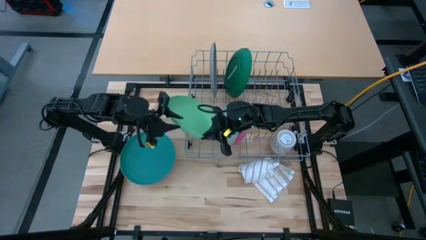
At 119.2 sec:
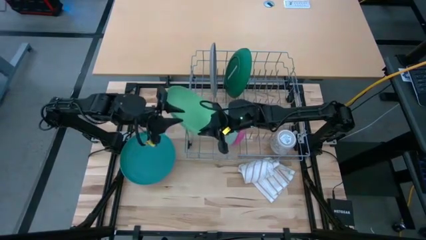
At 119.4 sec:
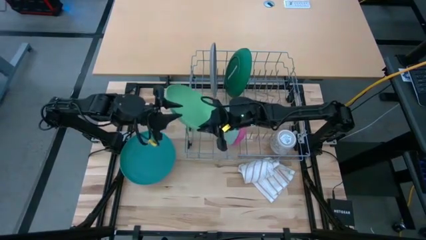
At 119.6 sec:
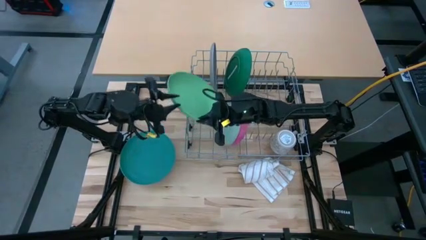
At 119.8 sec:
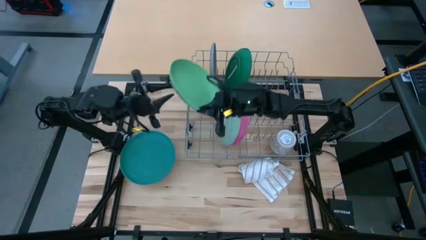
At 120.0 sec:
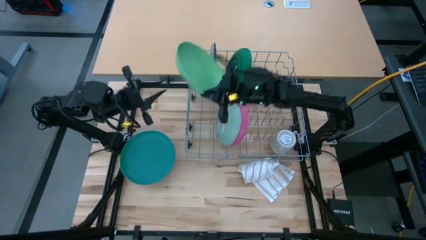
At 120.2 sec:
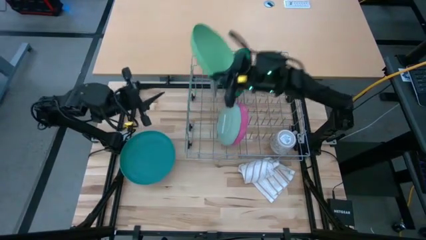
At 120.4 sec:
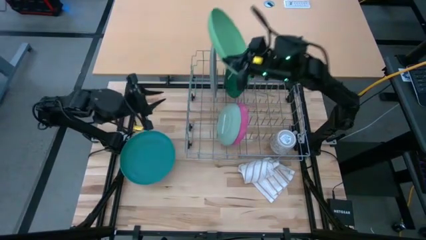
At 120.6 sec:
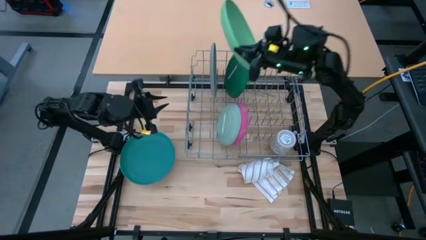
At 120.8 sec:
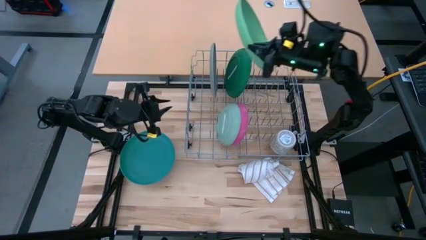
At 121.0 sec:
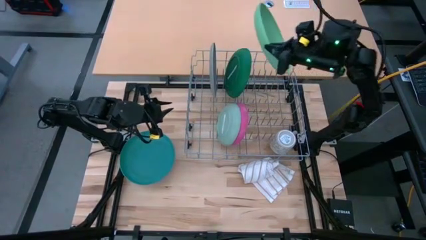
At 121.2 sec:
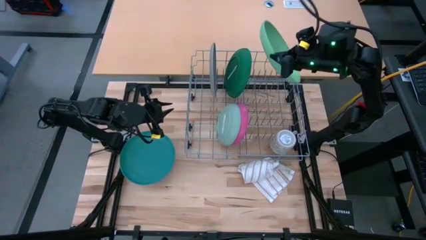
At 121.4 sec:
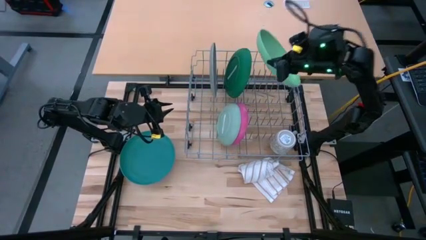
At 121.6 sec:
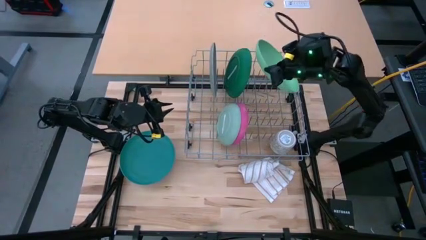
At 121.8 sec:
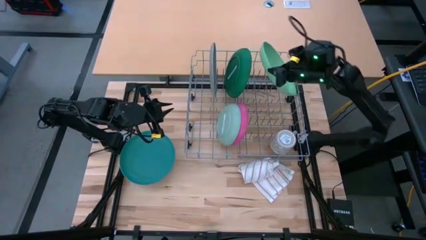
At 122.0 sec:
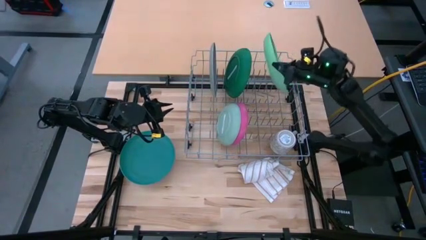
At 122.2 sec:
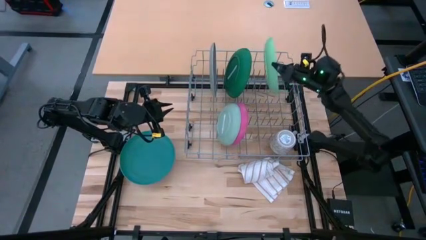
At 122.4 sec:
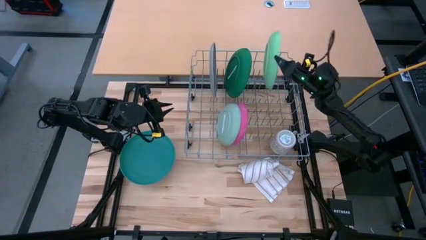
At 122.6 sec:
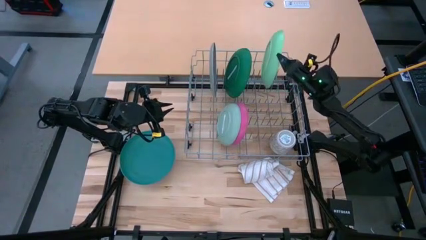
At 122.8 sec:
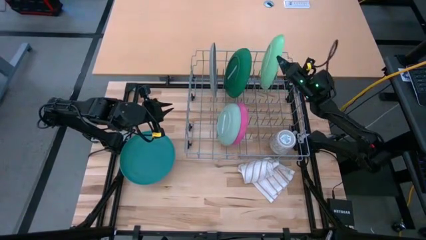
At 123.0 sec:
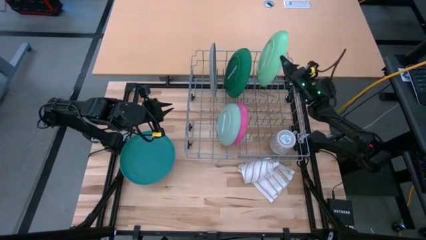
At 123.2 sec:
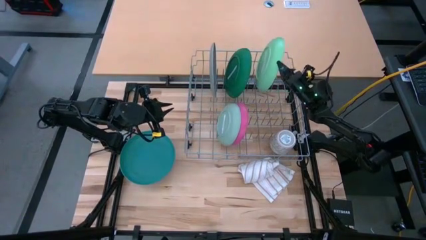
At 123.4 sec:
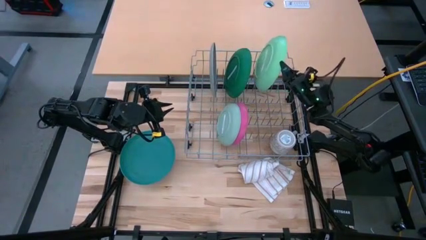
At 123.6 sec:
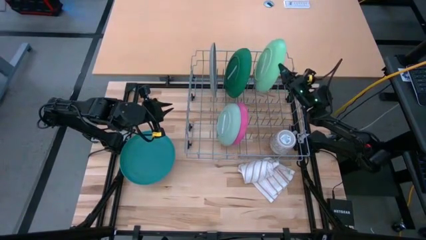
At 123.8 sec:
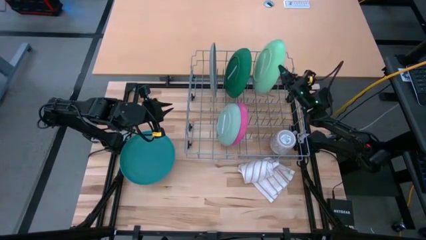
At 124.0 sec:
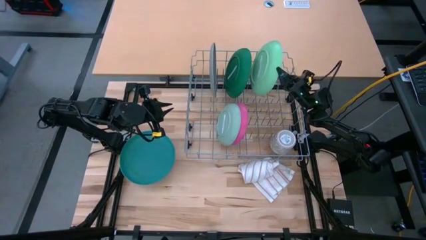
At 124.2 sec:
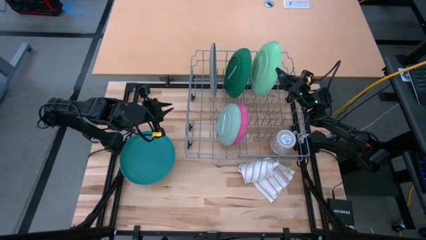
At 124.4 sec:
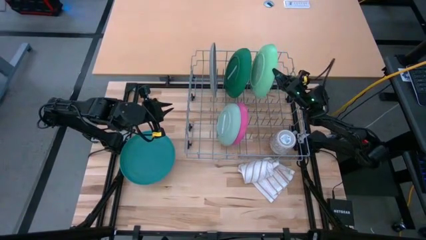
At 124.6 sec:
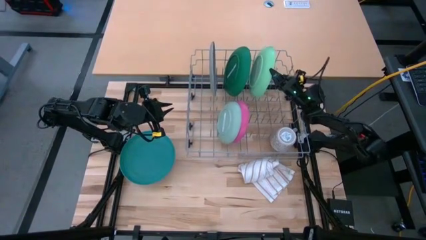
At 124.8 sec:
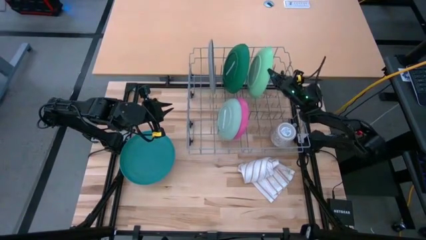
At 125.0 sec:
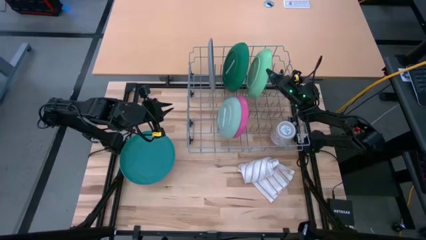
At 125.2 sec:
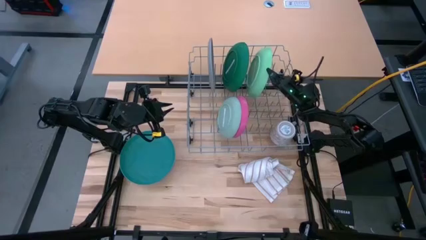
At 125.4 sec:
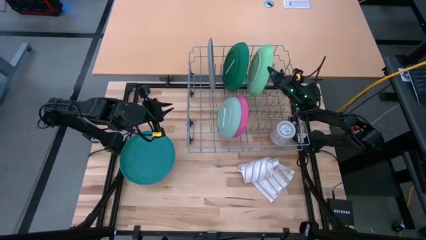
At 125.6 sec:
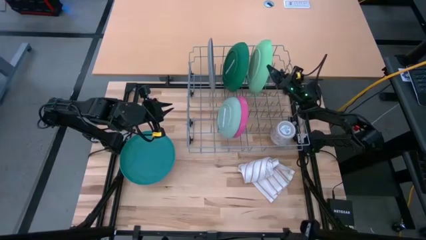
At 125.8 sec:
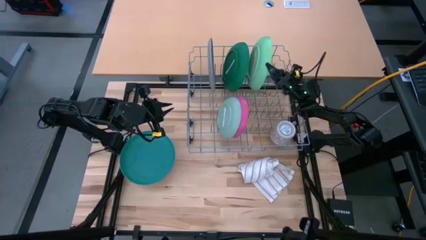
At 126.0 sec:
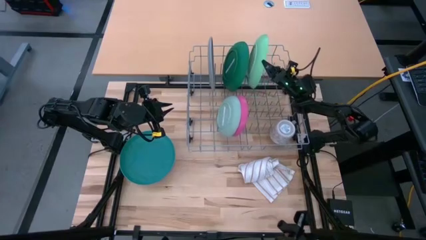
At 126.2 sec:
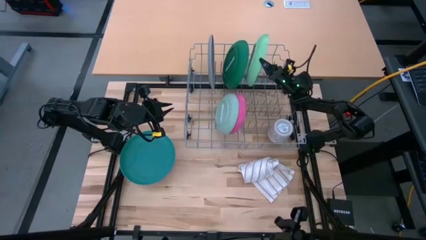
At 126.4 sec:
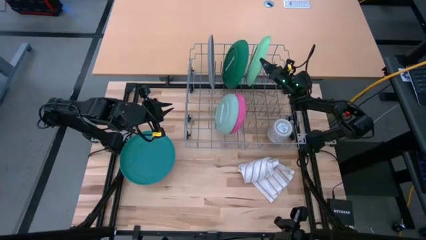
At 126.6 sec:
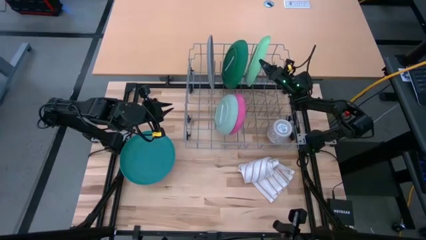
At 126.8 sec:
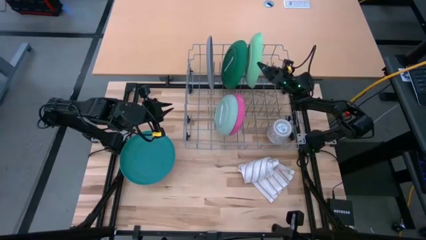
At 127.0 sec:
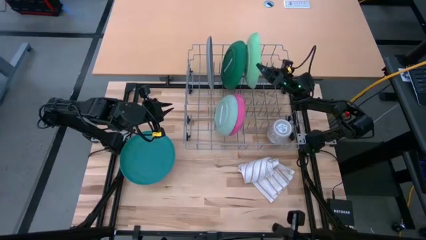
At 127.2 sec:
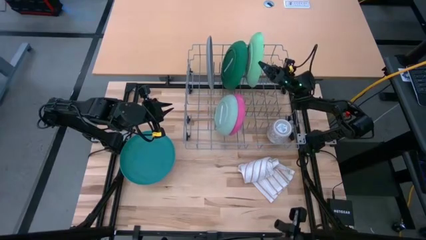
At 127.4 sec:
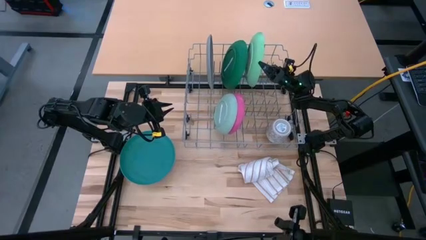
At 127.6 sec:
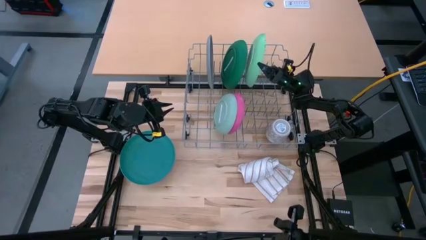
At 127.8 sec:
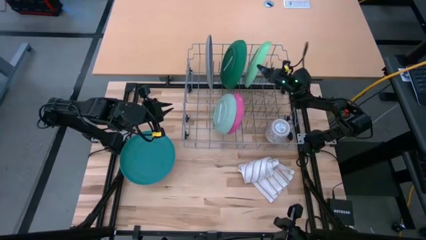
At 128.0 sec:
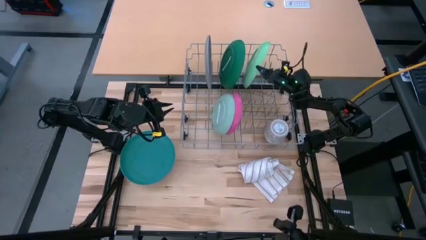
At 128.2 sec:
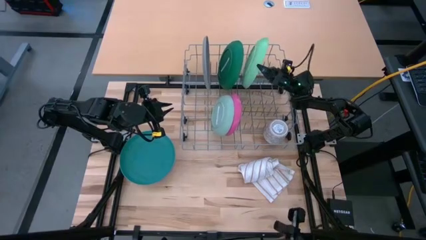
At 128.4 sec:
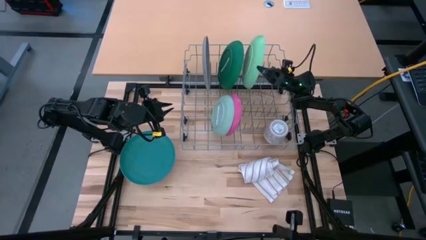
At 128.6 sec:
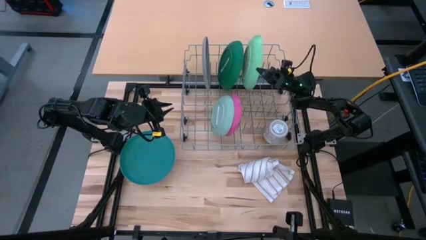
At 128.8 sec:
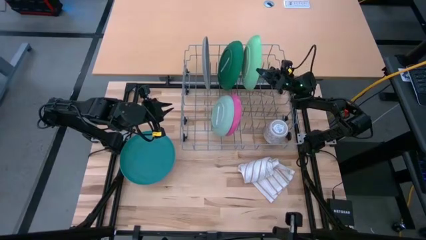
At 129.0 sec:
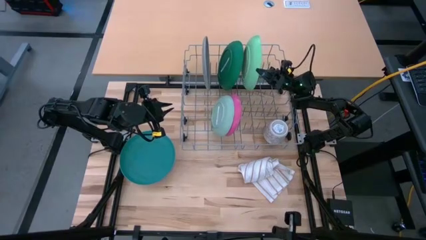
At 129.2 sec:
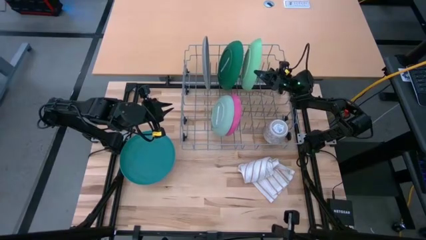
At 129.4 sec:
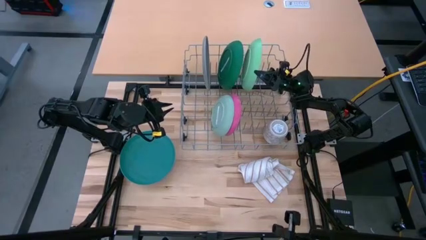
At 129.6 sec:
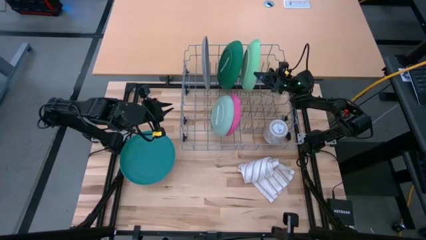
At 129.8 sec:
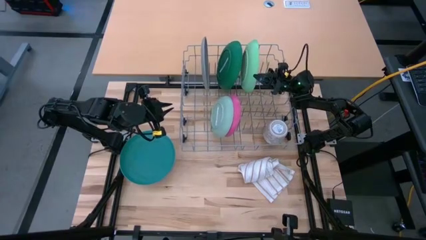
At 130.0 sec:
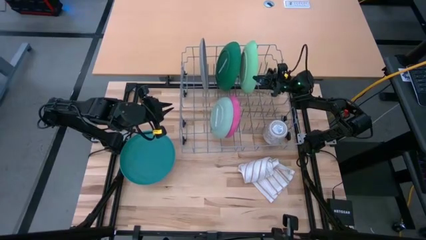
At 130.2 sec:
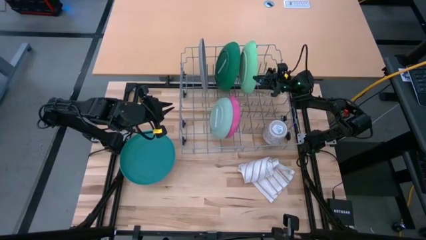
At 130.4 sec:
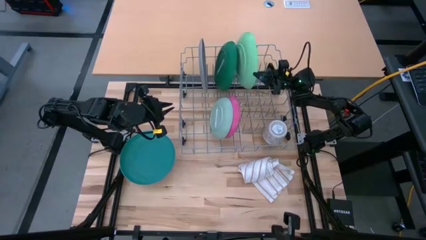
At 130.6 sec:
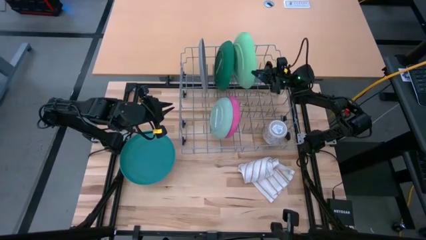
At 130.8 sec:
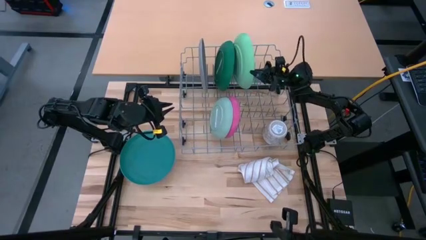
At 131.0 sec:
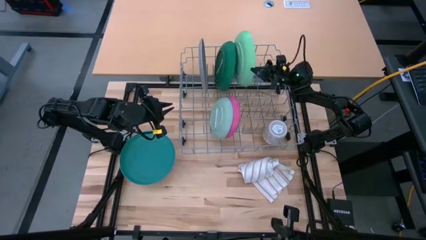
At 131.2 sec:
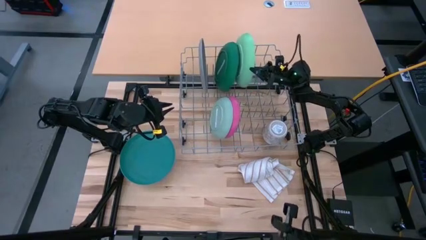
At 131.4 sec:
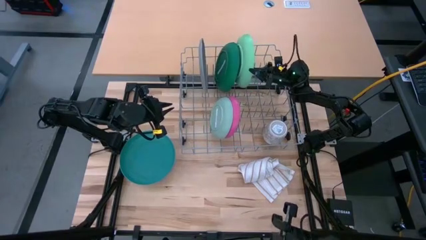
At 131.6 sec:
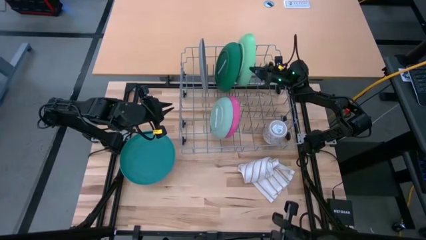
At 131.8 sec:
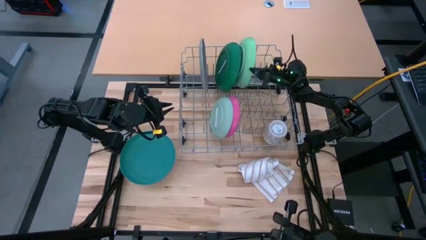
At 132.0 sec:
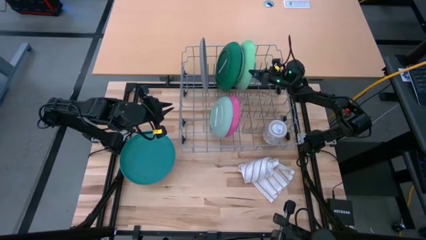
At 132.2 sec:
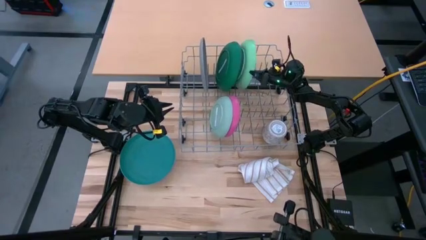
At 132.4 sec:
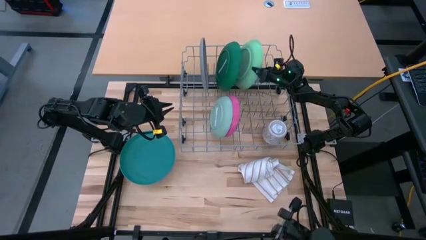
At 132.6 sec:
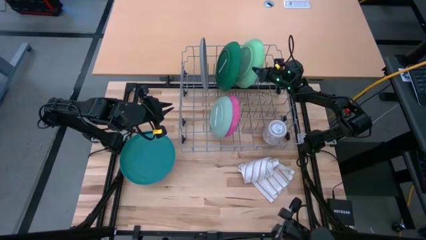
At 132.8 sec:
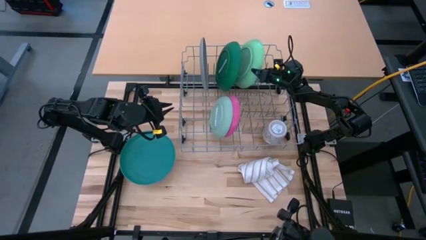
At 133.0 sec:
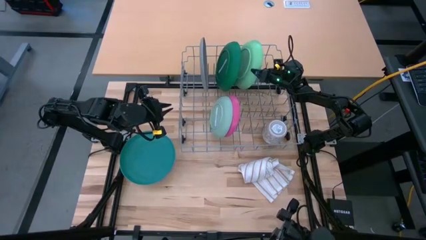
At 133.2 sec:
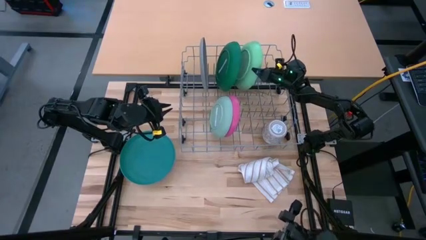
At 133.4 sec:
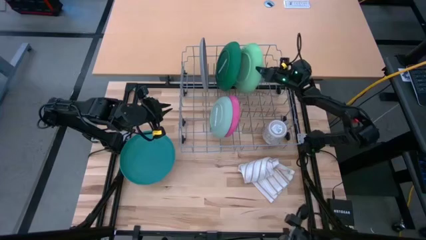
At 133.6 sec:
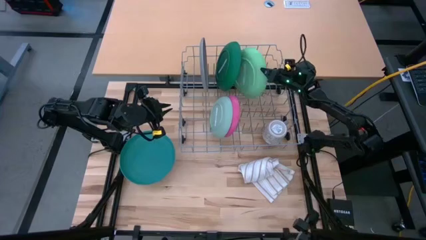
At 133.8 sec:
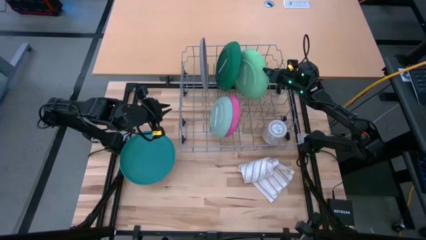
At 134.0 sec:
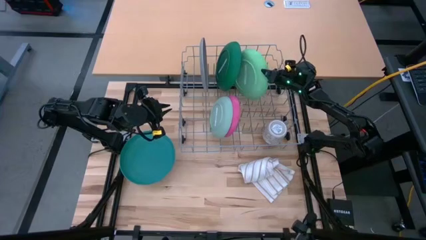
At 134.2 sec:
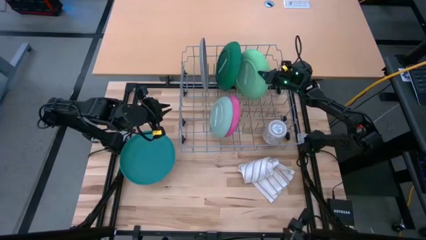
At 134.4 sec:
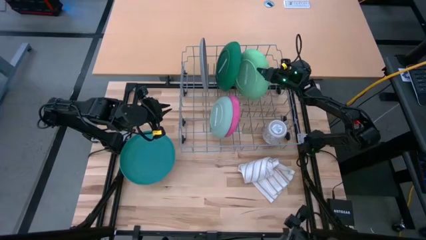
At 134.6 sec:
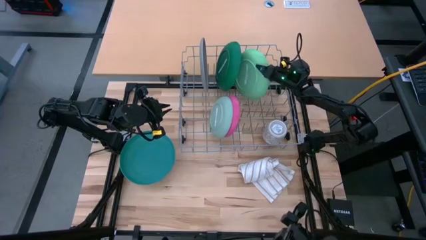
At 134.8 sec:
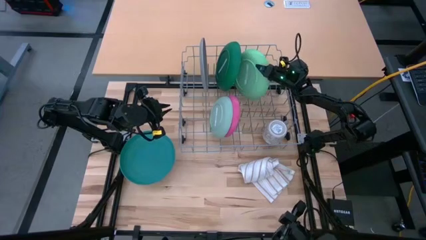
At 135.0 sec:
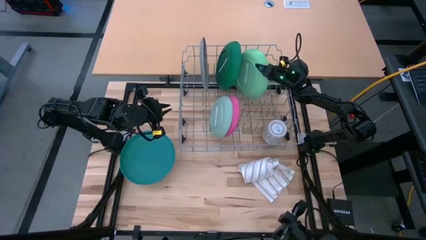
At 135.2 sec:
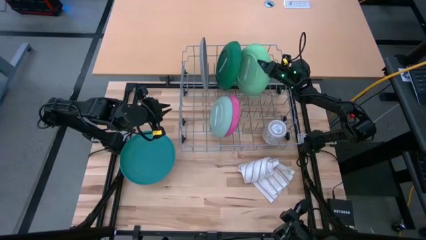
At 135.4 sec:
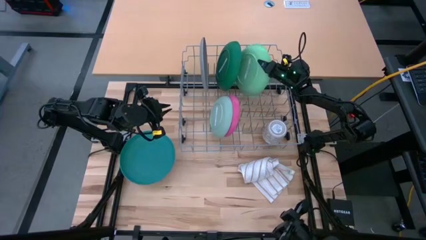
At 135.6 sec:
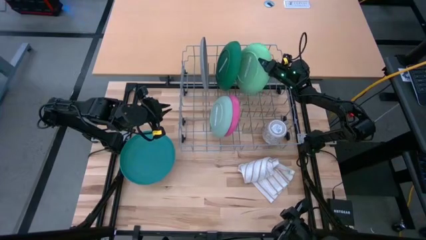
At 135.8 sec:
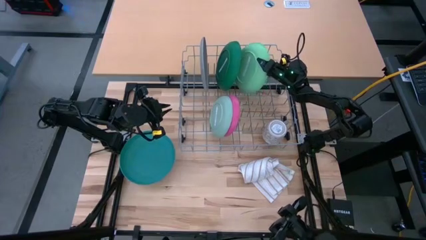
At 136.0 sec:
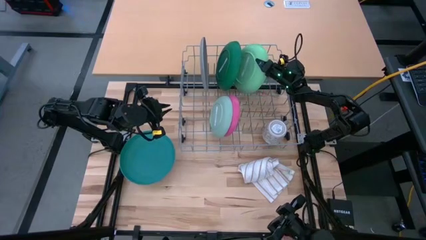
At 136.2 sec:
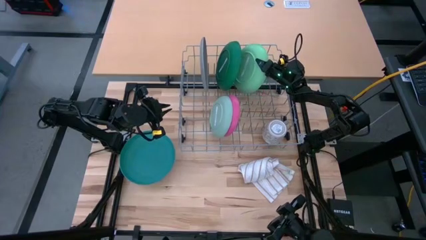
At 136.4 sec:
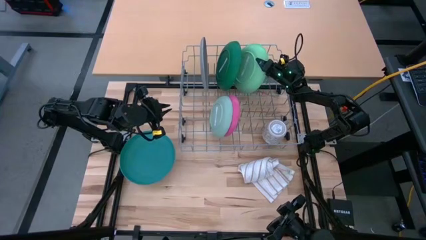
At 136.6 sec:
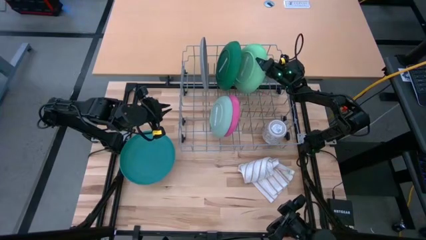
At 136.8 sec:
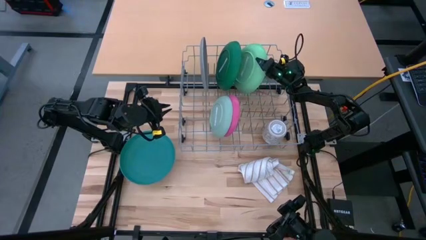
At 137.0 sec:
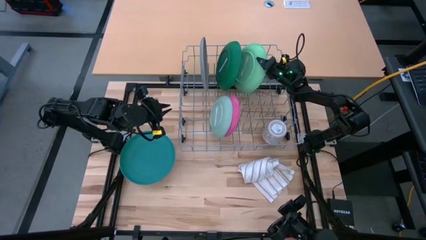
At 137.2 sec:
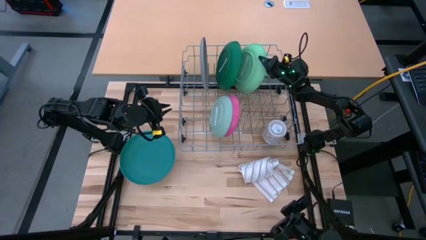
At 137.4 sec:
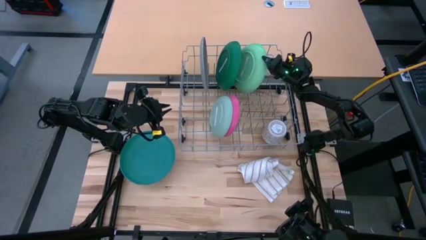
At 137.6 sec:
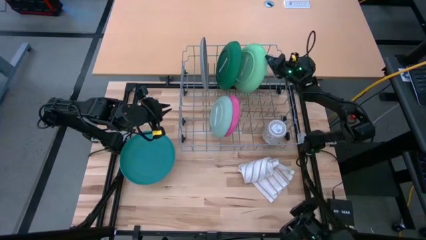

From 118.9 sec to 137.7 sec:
Task: Sort dishes
Put the green plate in the dish rack
